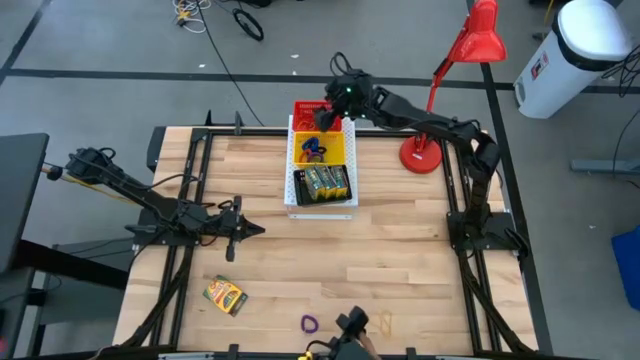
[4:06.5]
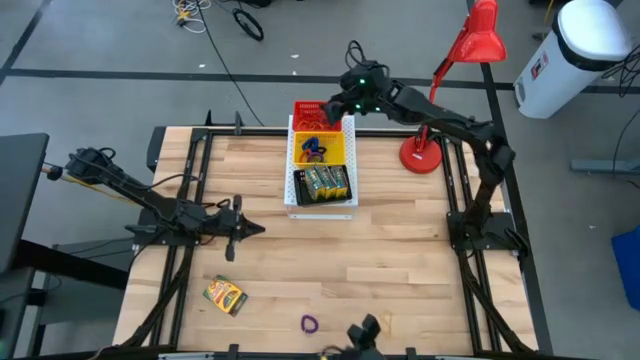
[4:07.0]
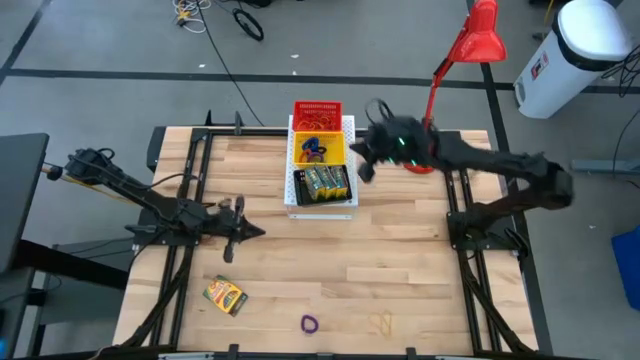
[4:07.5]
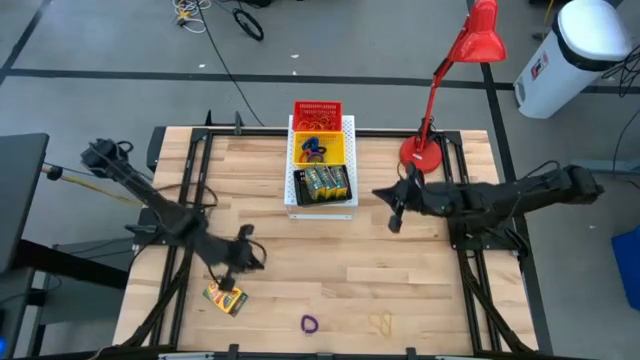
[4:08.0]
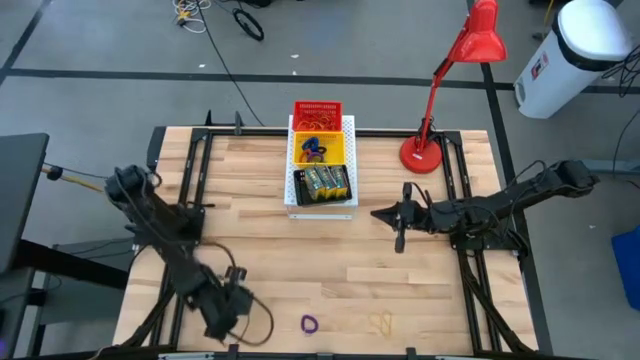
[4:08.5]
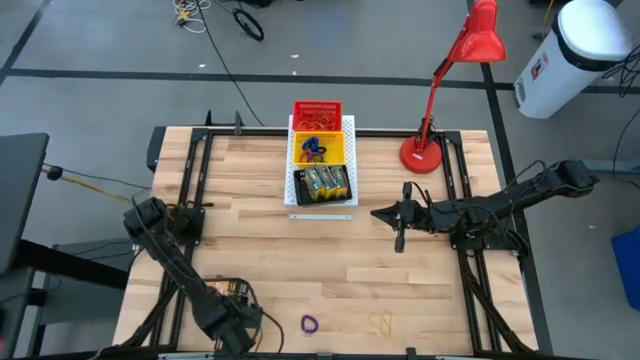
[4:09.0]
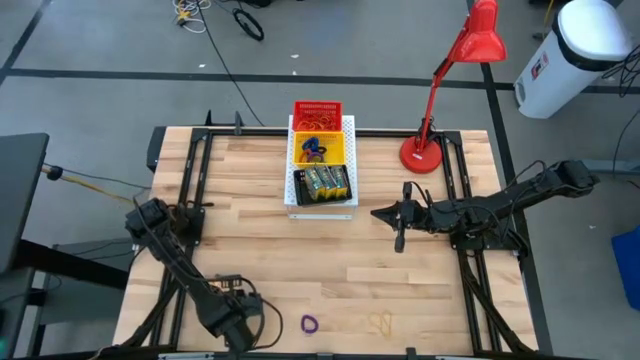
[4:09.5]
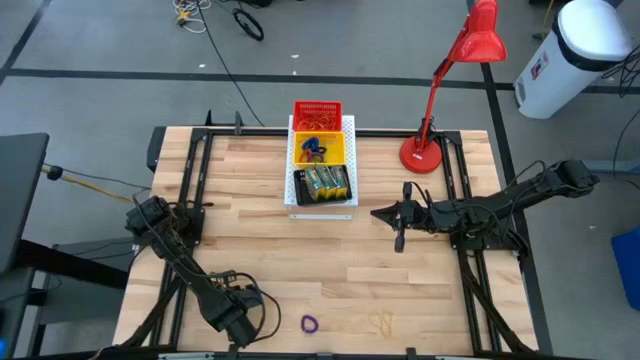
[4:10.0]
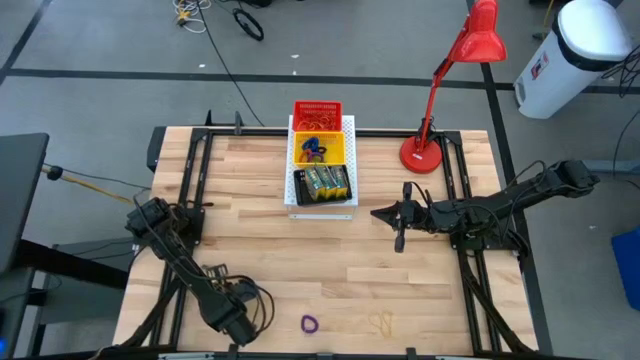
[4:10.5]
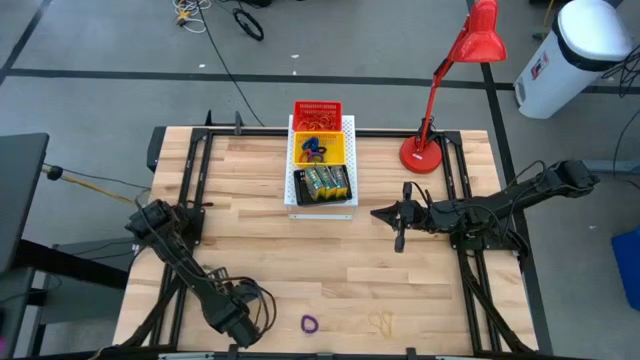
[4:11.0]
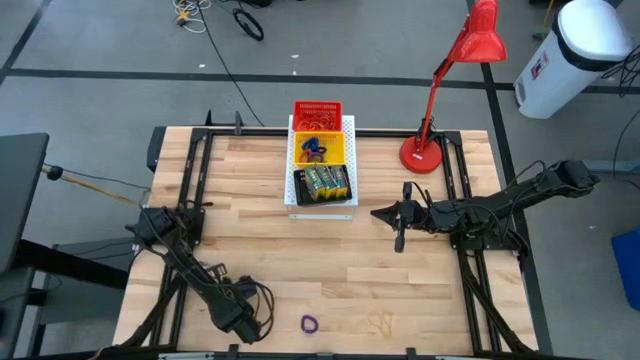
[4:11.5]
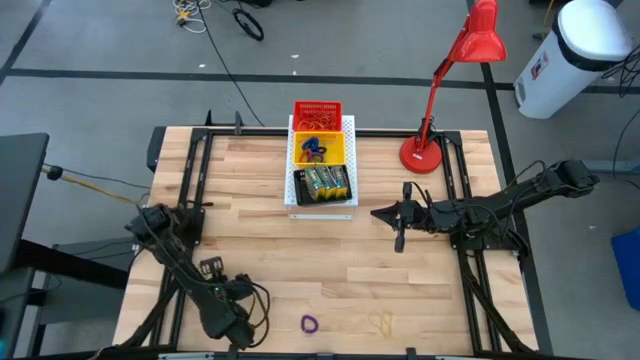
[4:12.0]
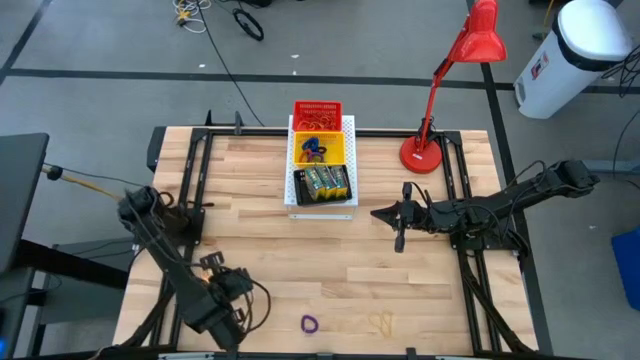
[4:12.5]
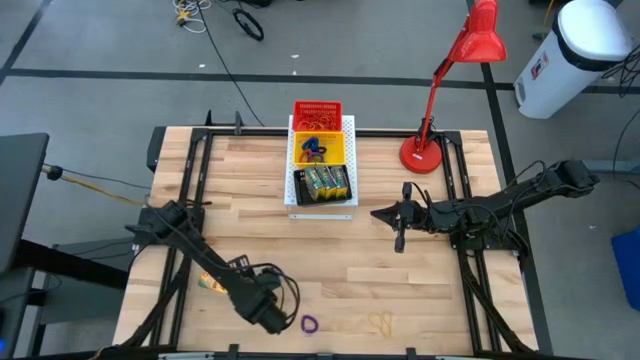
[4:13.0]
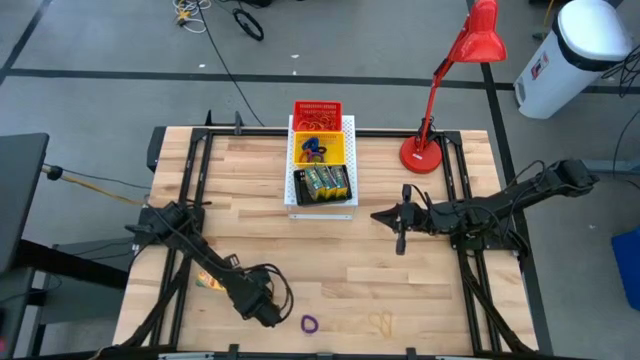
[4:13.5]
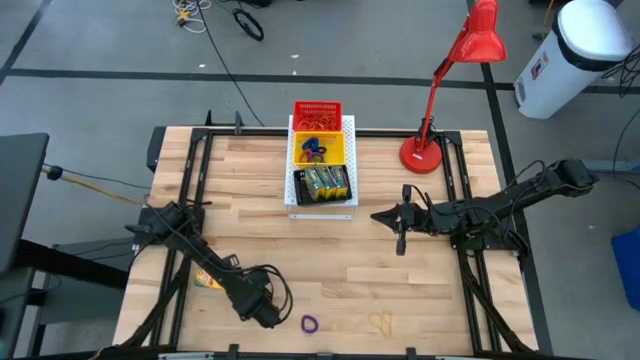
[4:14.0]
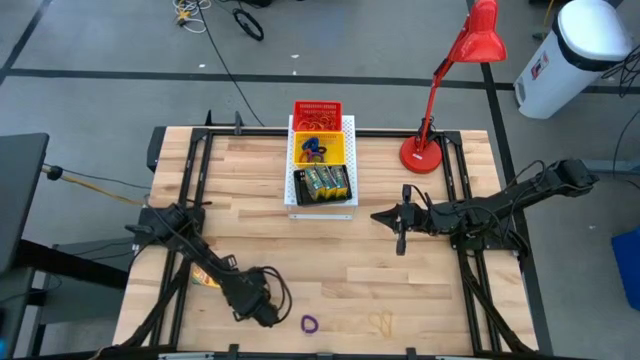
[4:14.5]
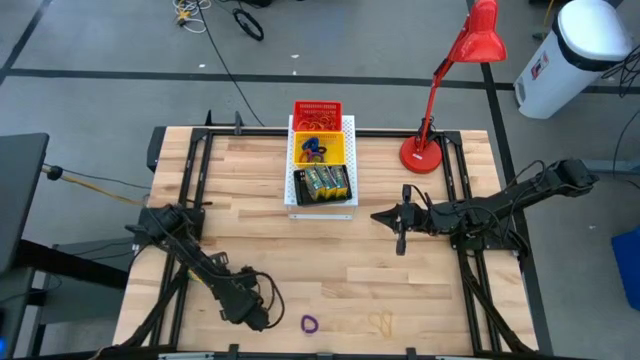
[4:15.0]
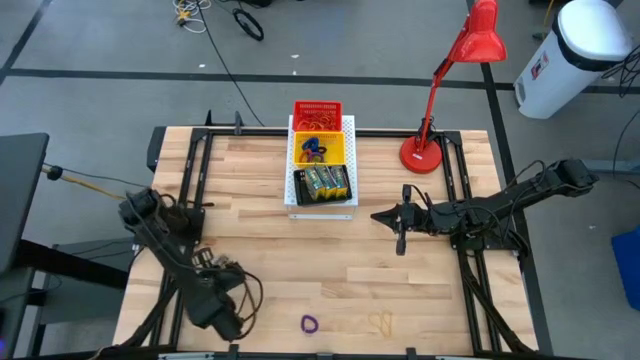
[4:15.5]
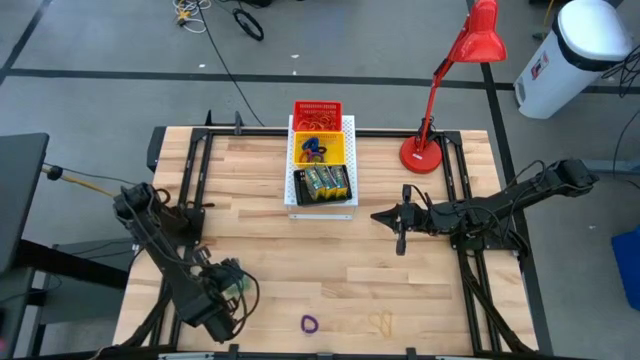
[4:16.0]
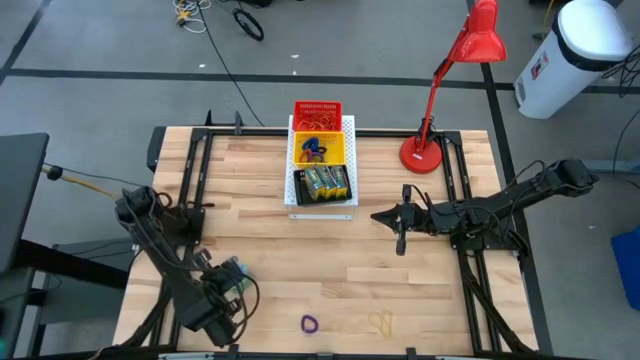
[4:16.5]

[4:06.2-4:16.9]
Task: Pick & Place Office Desk Supplies
Put the yellow crayon box into the black bin on the shelf

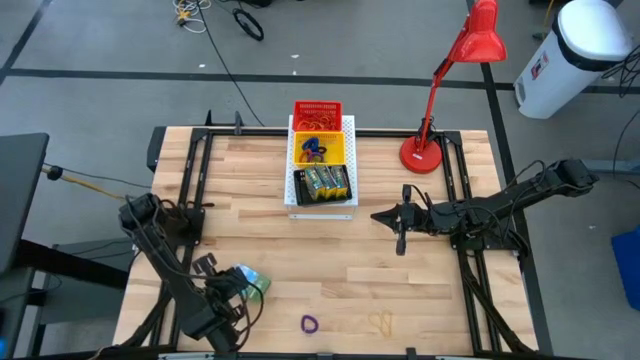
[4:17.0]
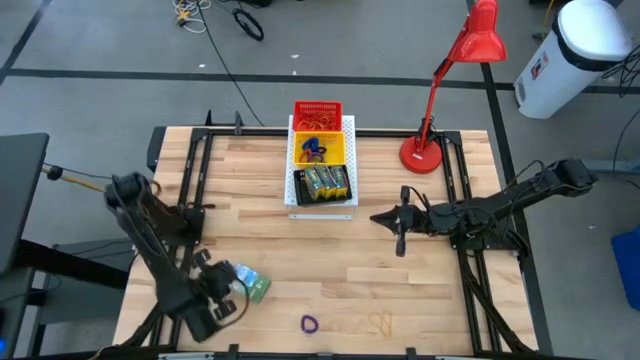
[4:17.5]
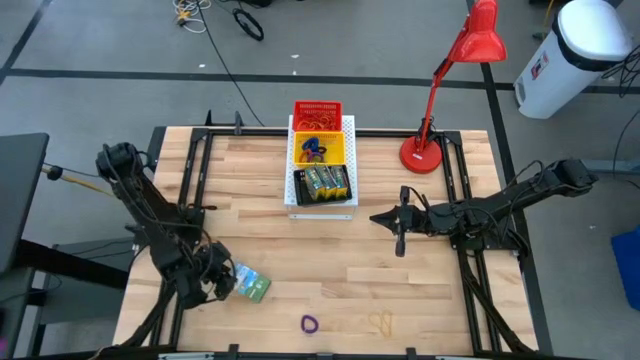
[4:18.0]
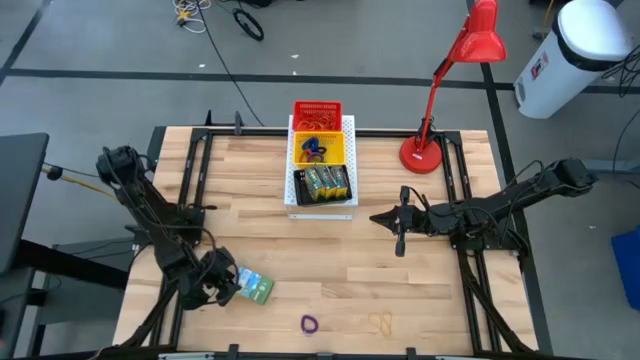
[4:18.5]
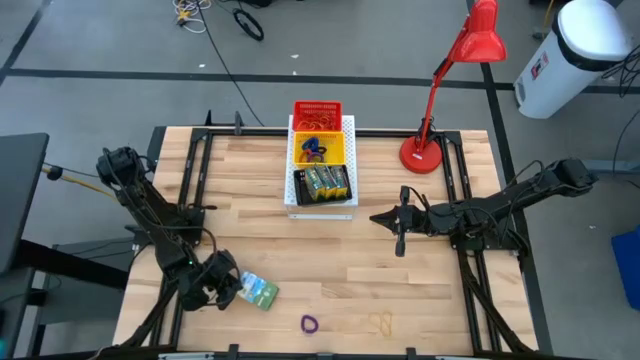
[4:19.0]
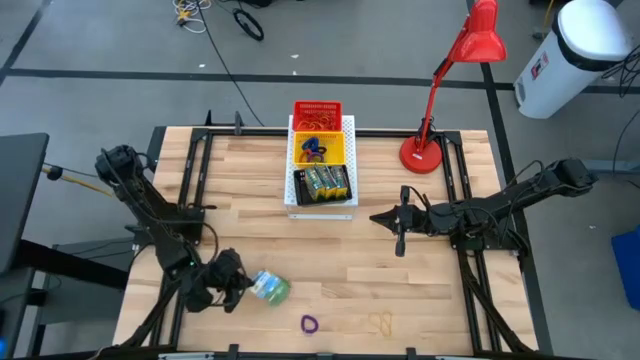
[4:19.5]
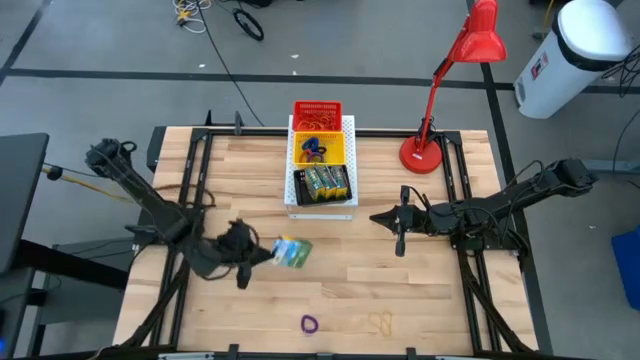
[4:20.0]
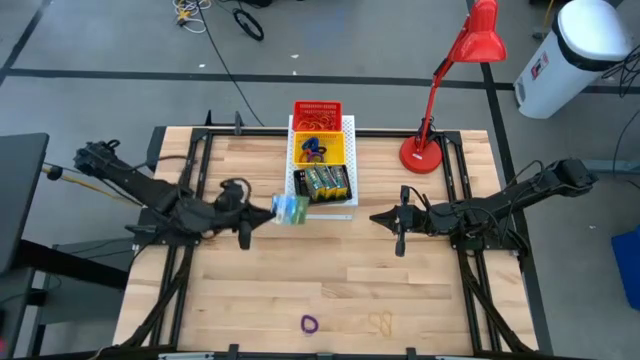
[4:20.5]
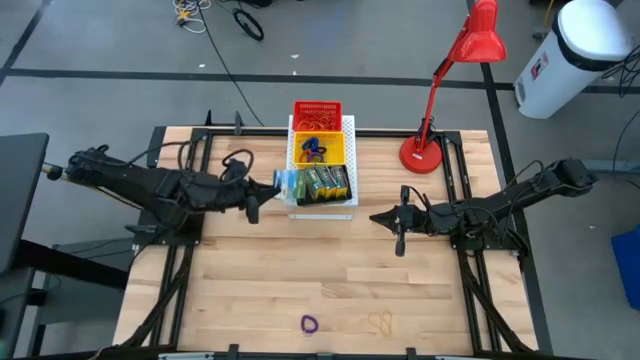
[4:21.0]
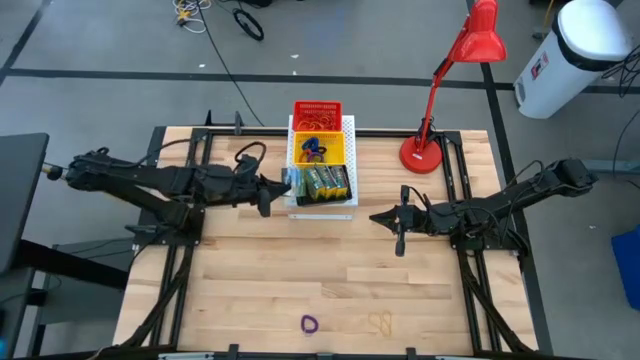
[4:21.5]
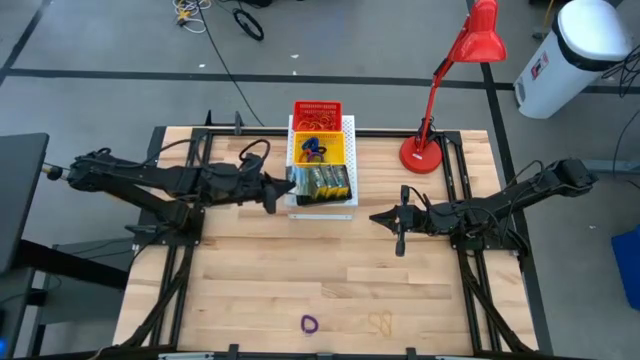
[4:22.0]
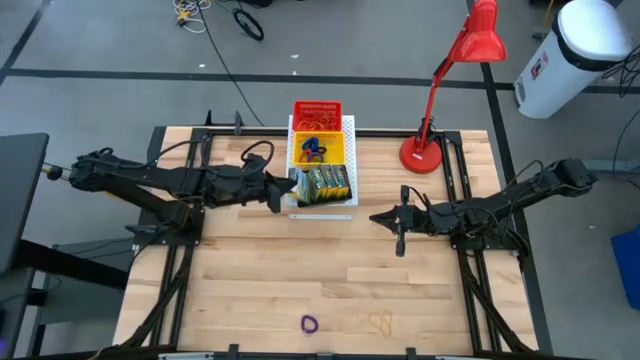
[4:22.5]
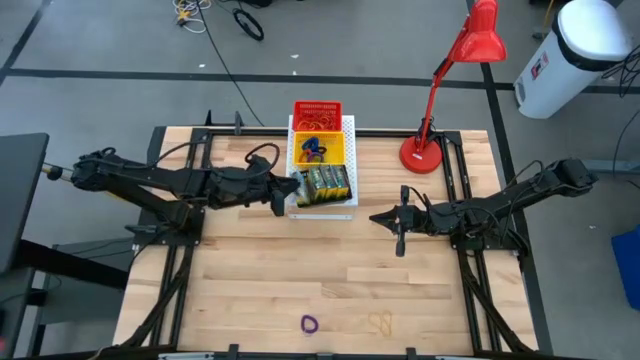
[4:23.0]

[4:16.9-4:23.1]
Put the yellow crayon box into the black bin on the shelf

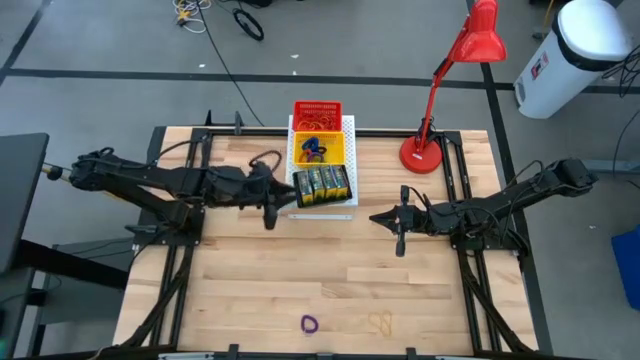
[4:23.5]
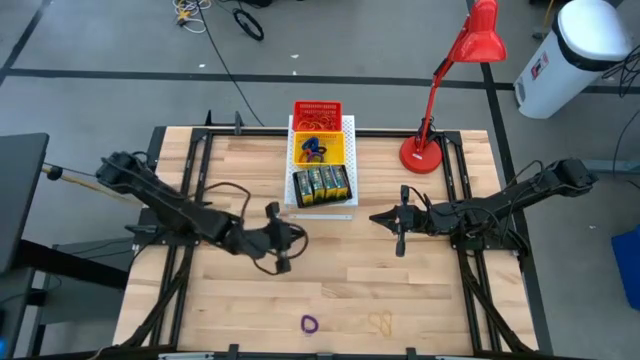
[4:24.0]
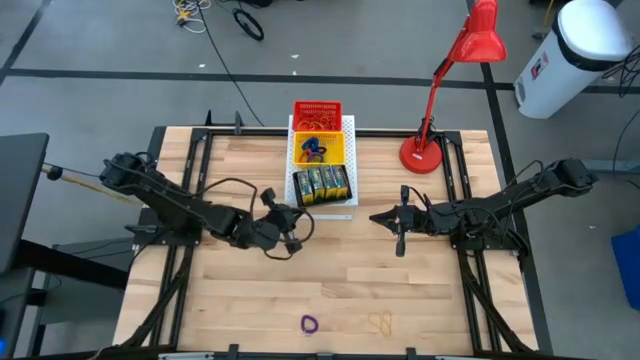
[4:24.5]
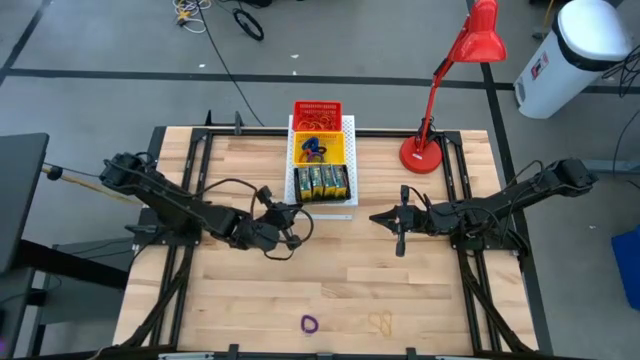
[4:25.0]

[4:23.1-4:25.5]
Adjust the black bin on the shelf

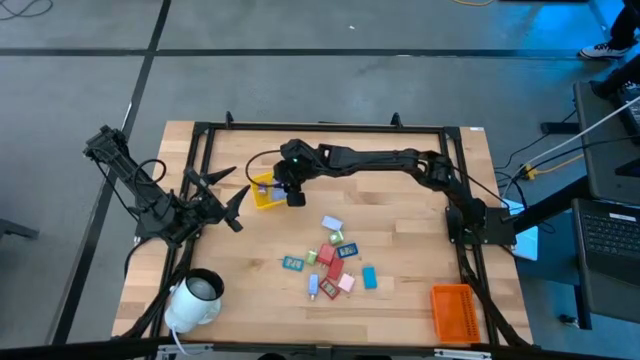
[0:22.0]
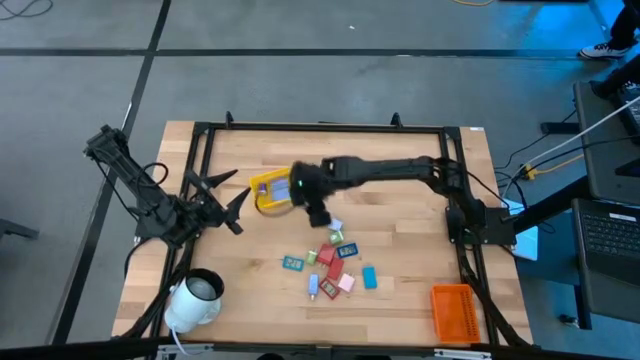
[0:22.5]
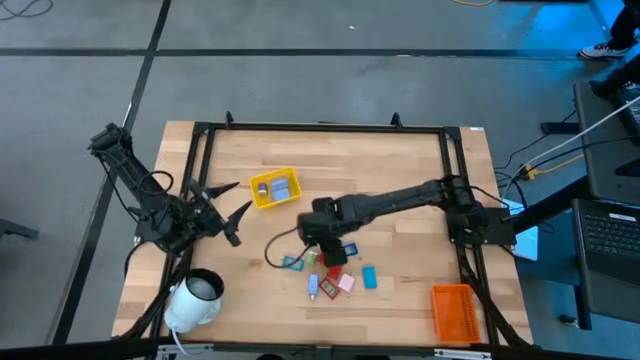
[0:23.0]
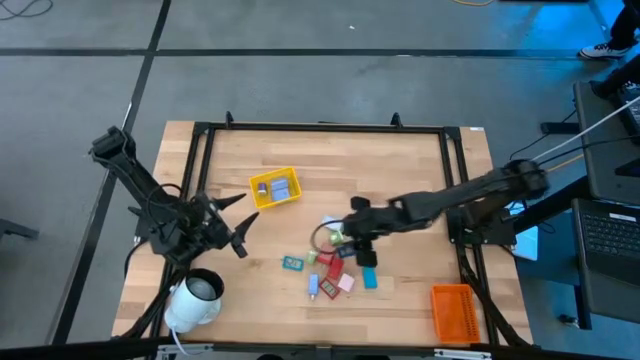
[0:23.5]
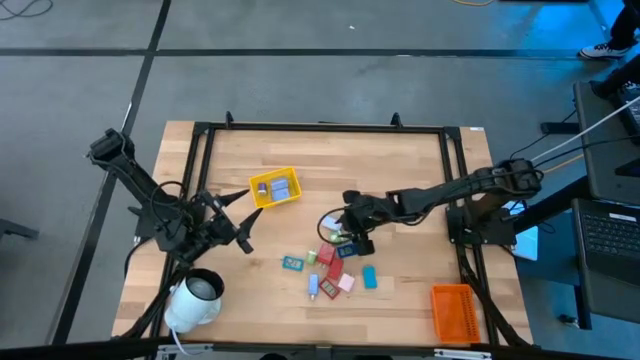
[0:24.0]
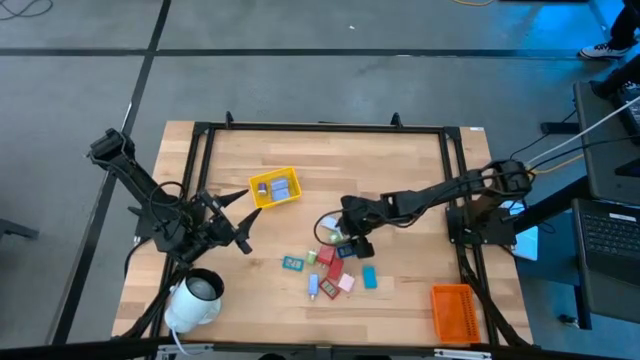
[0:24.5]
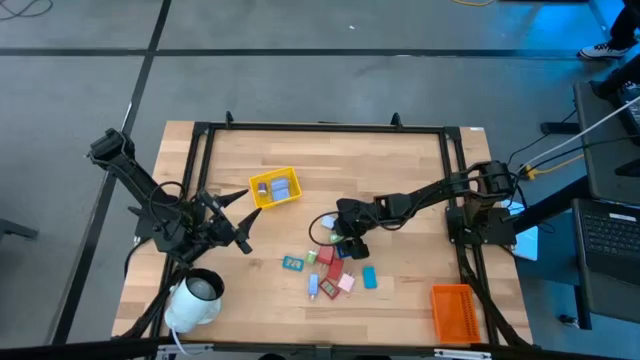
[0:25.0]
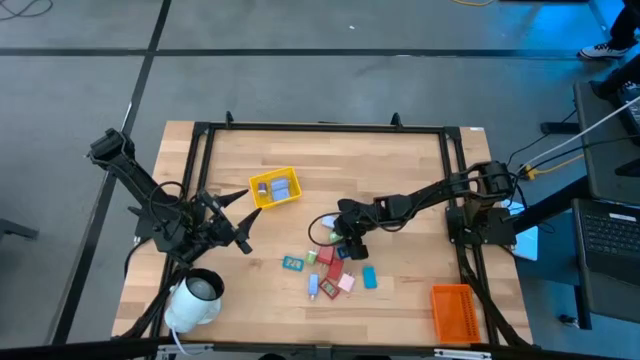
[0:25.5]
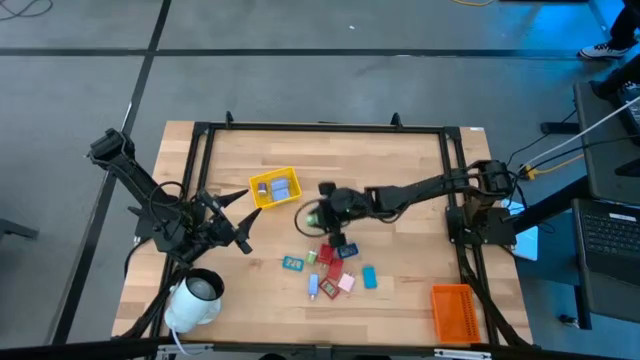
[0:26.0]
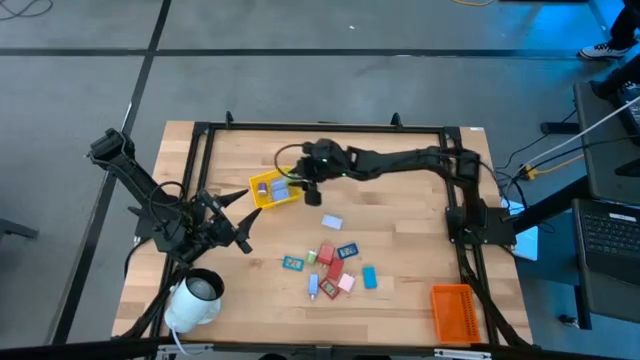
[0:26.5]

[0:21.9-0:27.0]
Task: Pick & Place Office items
Put the right green charger adapter into the yellow bin
